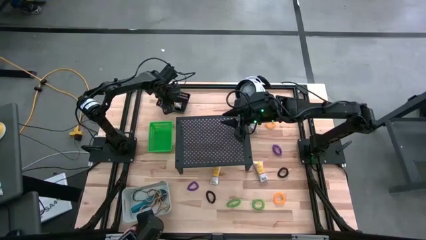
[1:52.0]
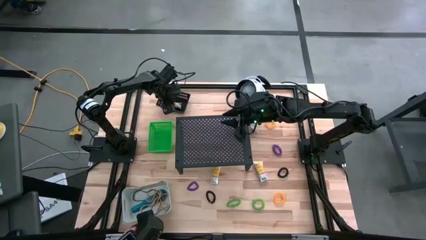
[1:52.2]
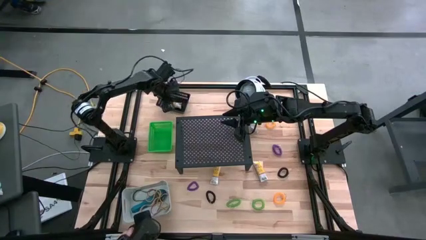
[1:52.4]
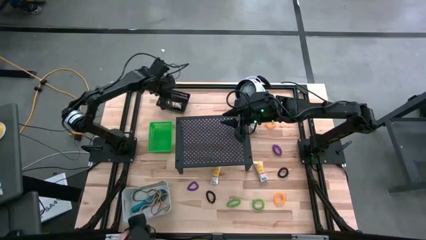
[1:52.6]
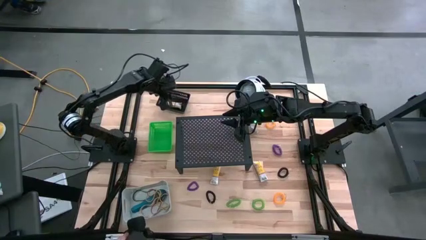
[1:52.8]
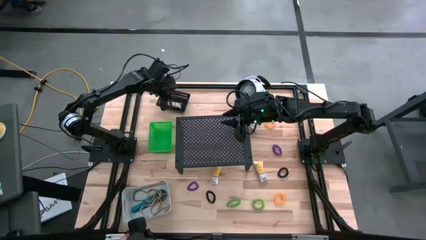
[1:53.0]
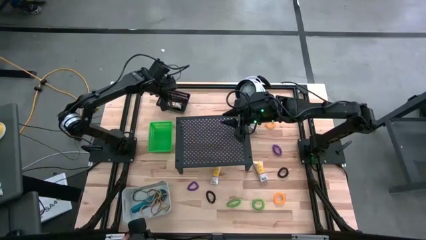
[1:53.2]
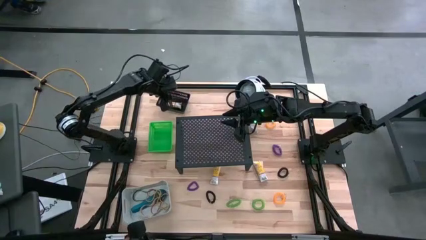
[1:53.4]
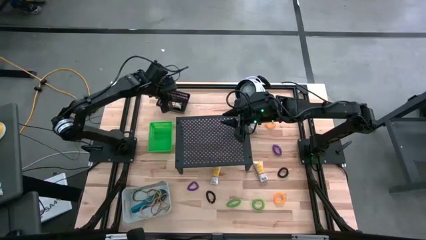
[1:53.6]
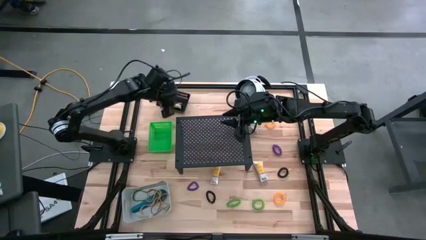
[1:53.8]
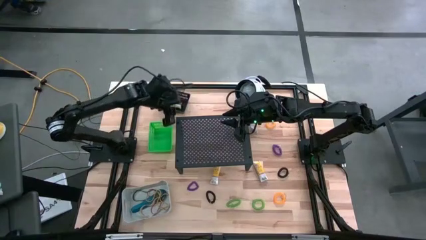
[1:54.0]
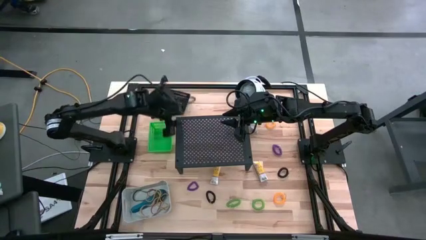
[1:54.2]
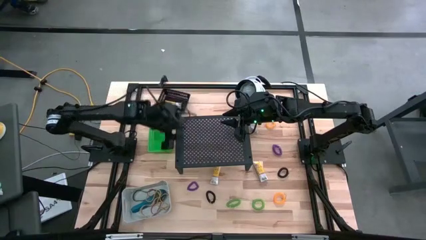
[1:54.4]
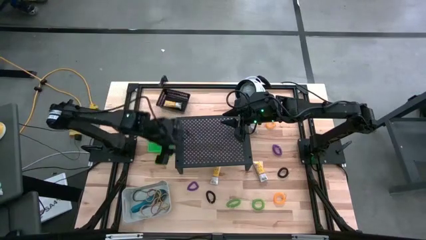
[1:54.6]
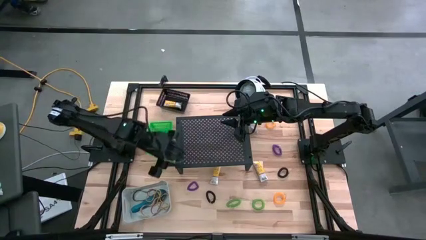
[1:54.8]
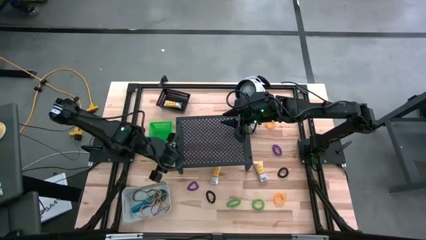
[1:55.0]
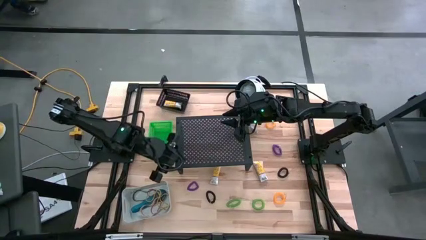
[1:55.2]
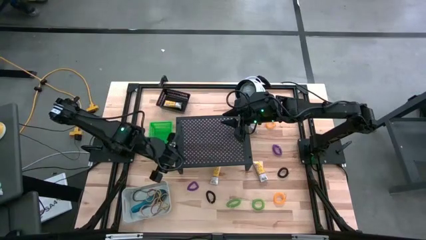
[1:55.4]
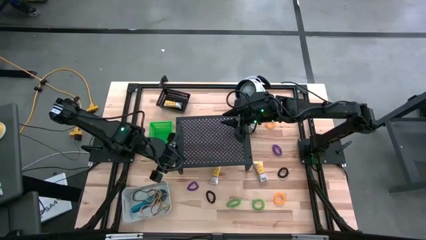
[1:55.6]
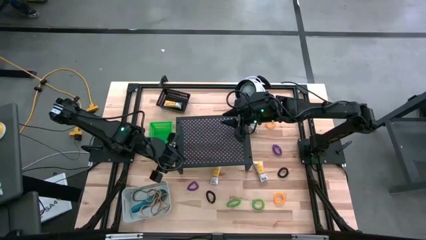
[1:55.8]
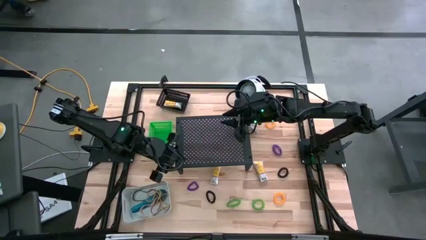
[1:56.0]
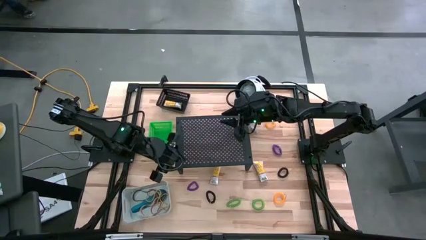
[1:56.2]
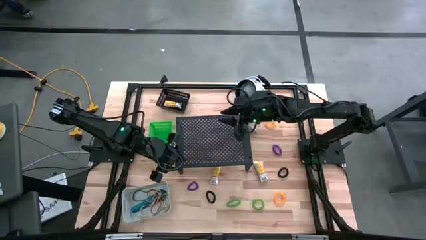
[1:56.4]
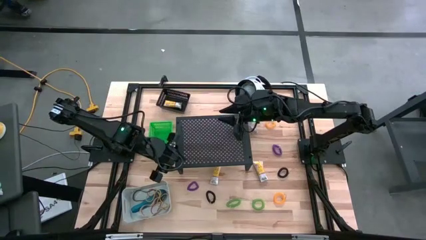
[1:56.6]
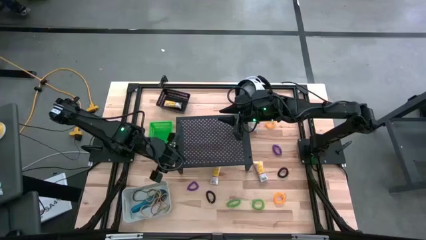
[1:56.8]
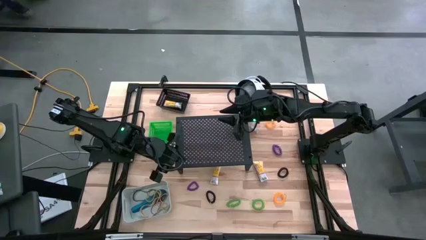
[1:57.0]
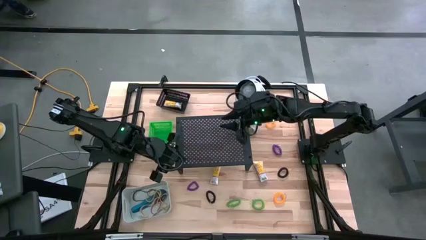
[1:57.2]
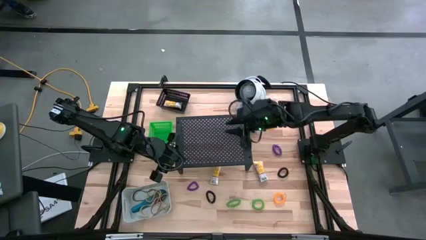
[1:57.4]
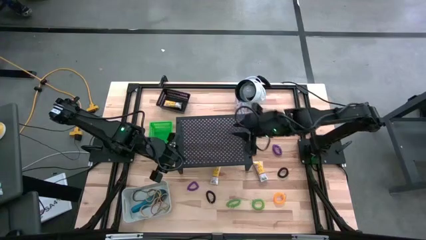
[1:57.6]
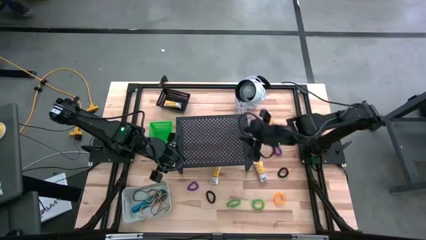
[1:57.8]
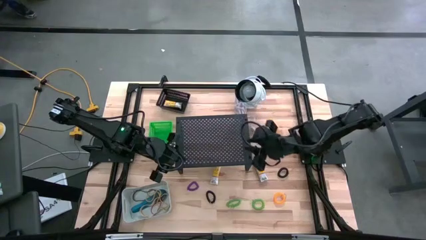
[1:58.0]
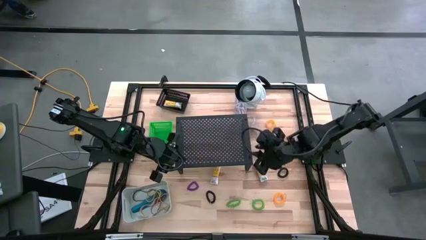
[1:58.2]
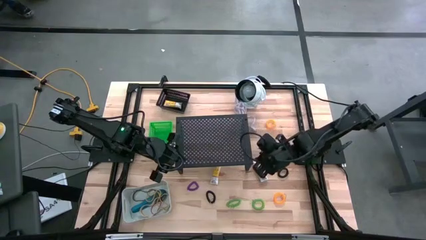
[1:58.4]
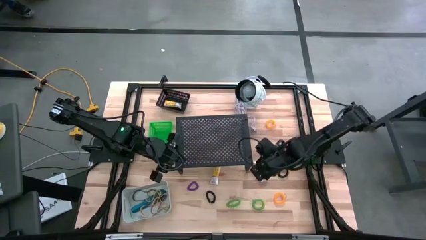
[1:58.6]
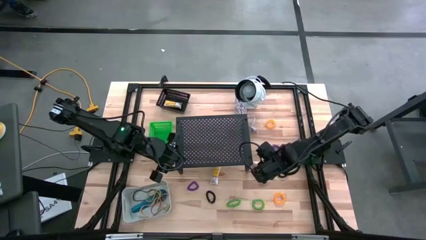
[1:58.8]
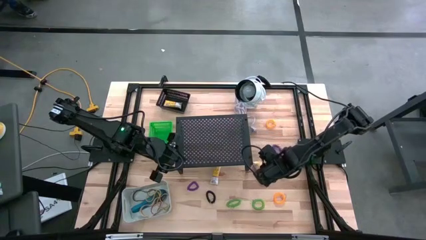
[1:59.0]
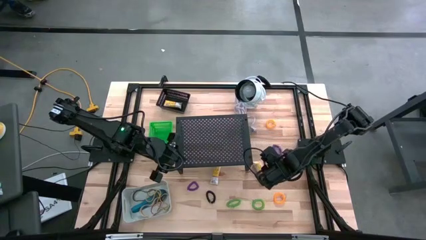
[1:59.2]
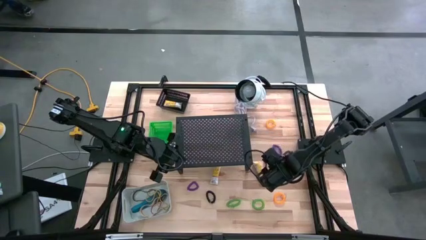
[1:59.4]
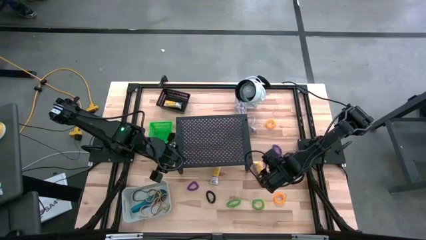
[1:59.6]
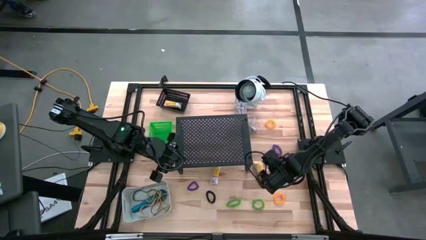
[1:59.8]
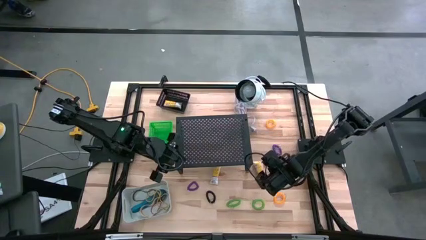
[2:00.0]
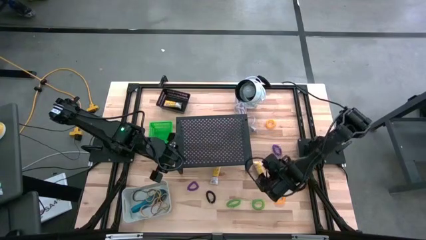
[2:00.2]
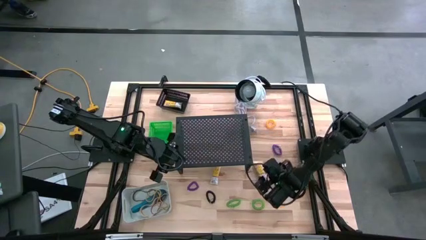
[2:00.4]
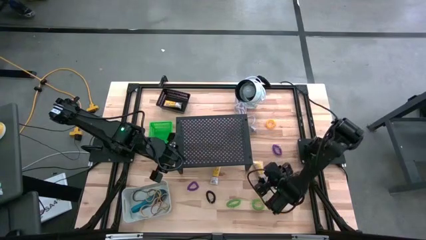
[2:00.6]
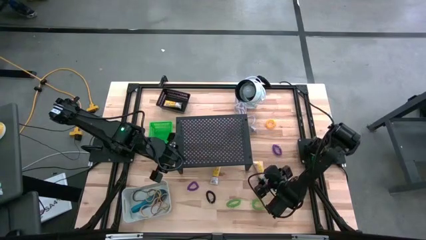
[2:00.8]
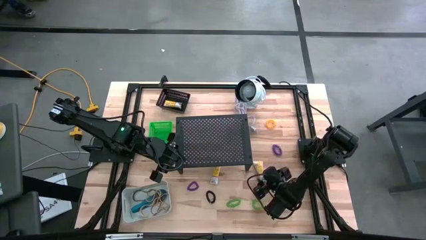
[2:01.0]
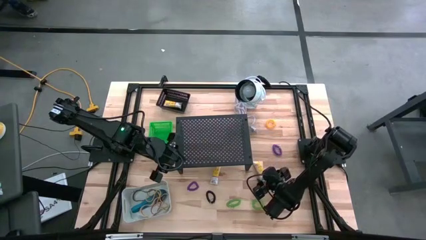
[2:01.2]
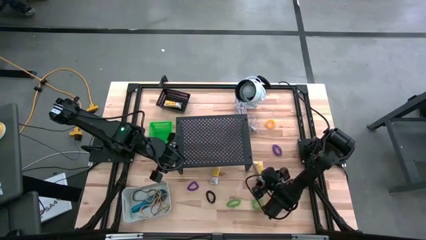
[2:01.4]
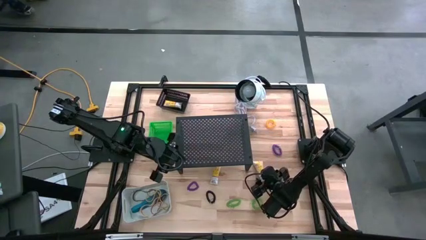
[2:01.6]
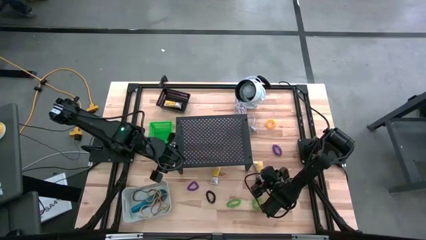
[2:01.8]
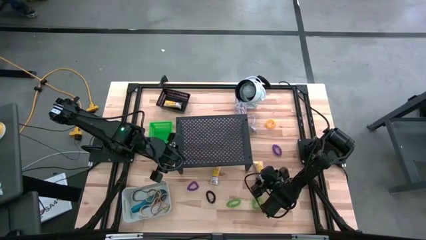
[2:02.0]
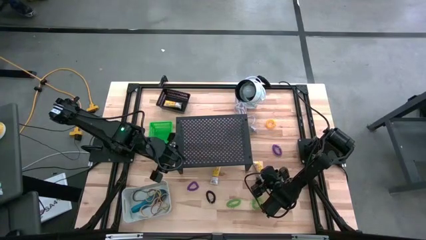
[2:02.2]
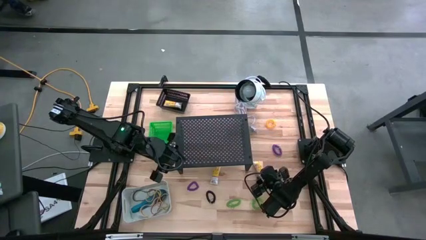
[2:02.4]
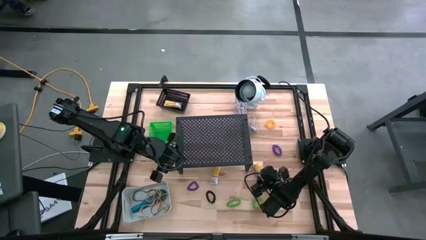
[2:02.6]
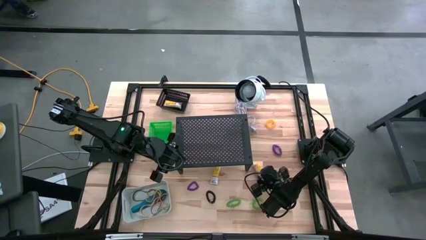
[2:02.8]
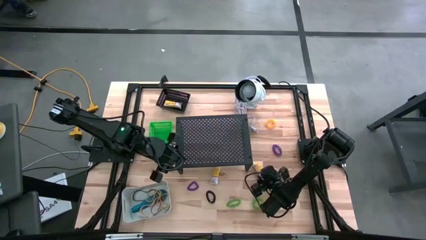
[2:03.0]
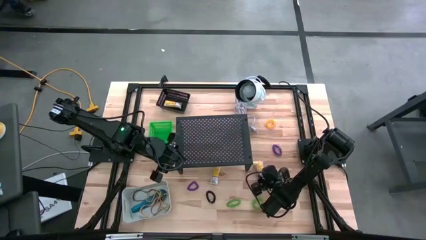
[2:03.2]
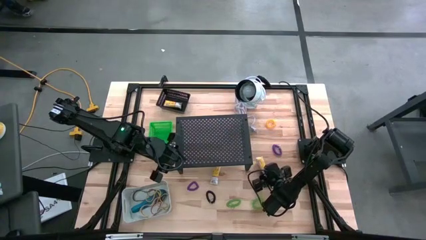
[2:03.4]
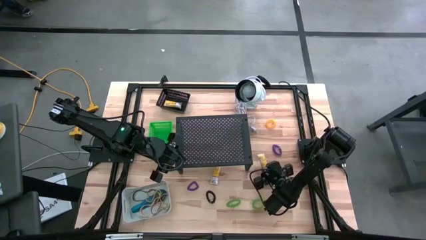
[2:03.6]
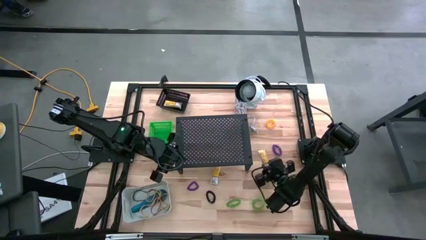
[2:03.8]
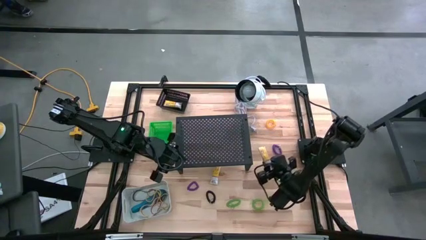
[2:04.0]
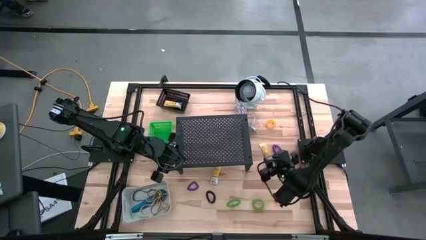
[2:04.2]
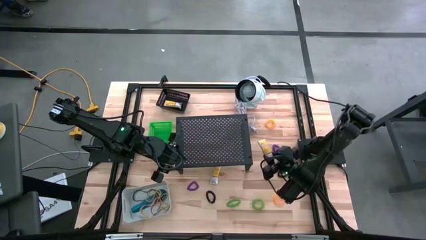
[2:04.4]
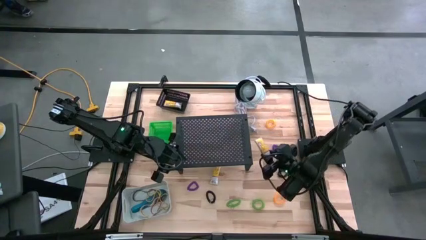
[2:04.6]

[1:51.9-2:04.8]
Task: Pick & Place Office Desk Supplies
Put the right crayon box into the black bin

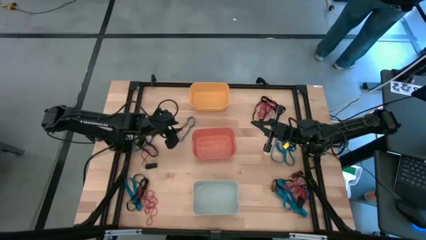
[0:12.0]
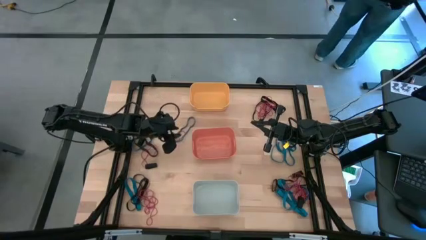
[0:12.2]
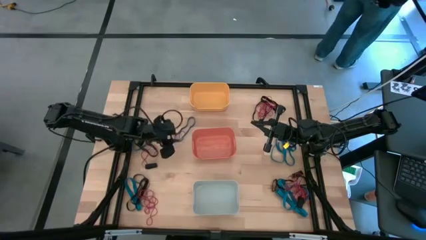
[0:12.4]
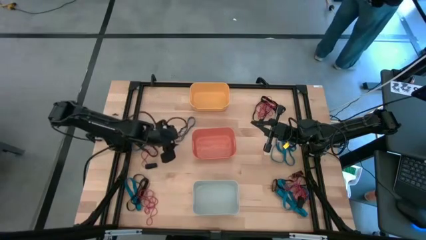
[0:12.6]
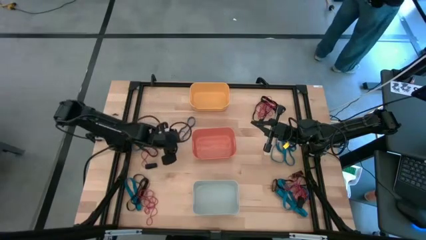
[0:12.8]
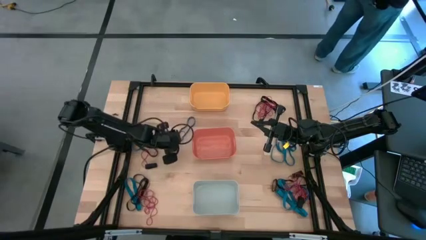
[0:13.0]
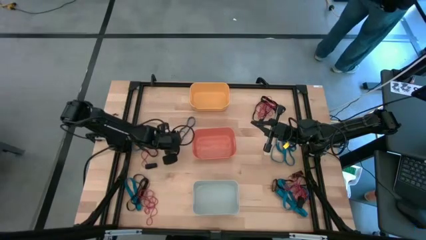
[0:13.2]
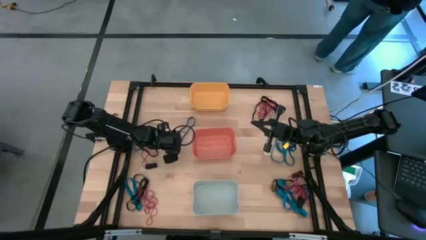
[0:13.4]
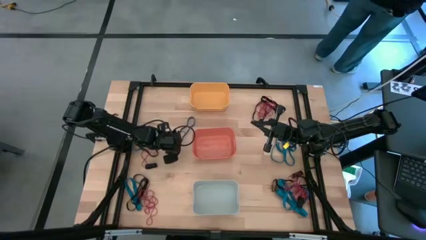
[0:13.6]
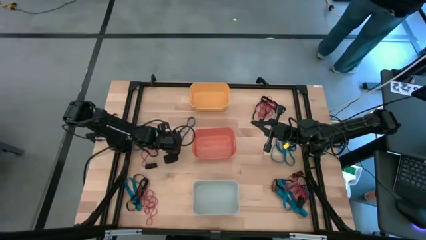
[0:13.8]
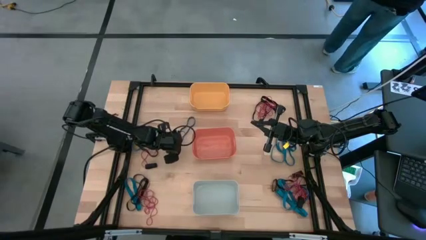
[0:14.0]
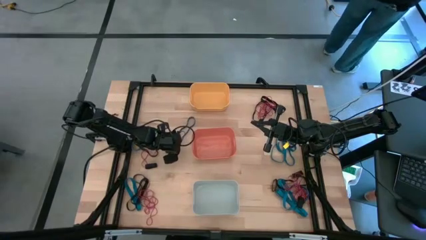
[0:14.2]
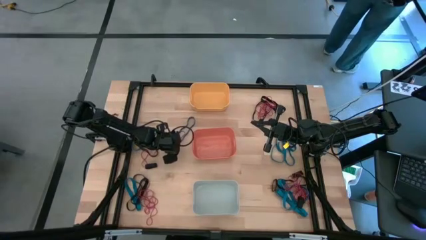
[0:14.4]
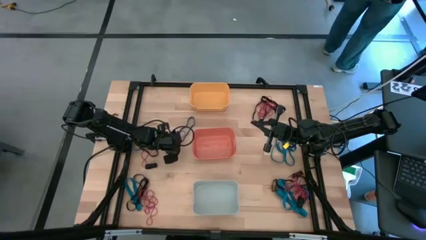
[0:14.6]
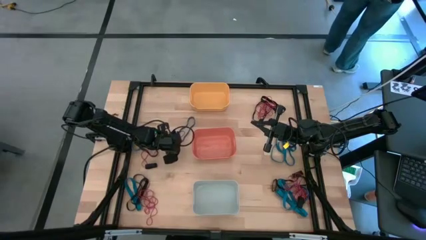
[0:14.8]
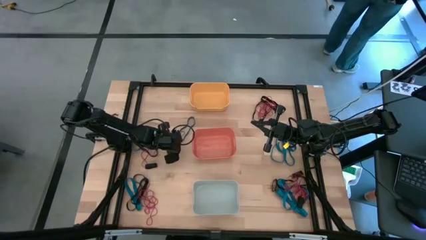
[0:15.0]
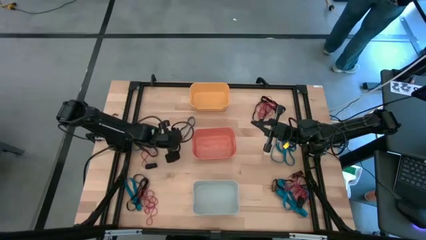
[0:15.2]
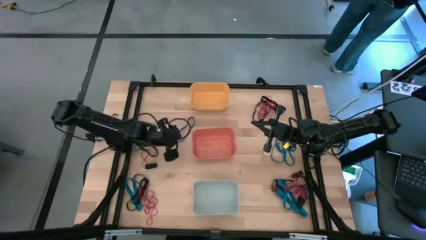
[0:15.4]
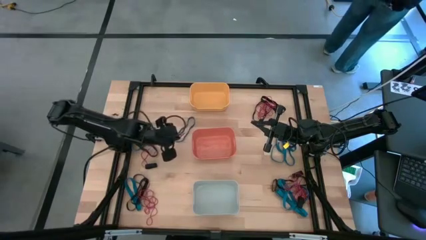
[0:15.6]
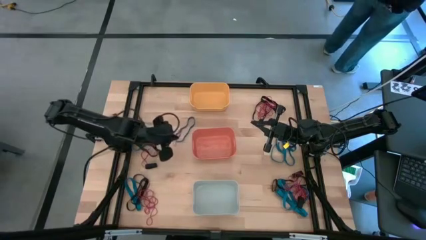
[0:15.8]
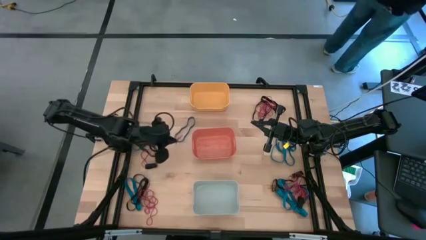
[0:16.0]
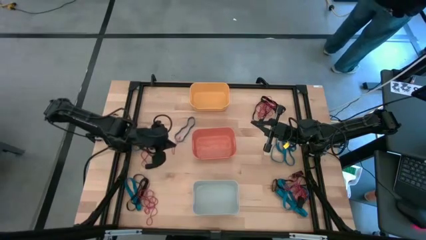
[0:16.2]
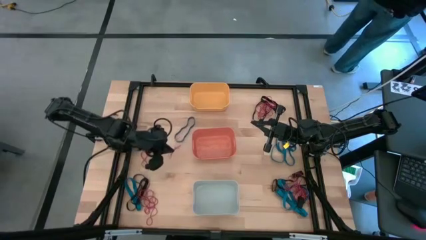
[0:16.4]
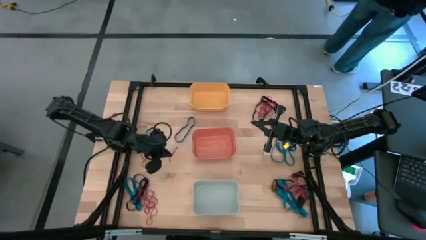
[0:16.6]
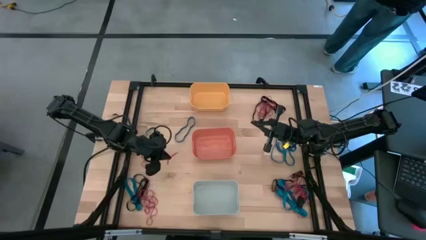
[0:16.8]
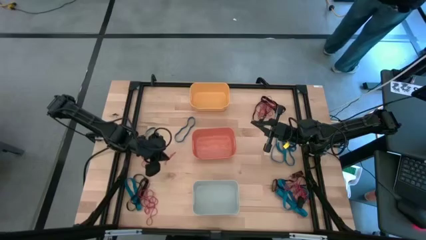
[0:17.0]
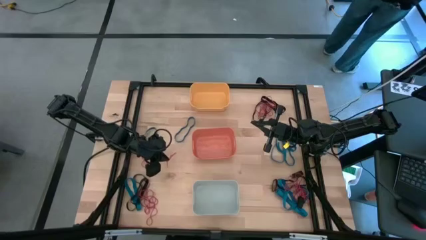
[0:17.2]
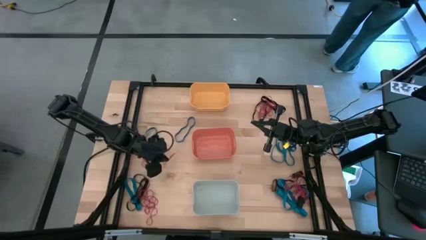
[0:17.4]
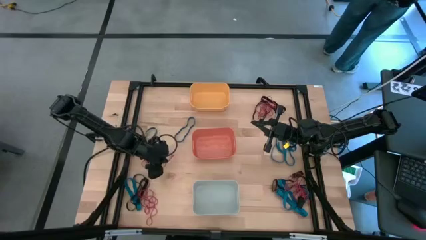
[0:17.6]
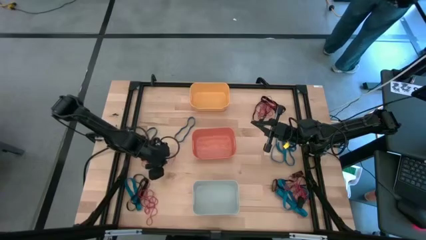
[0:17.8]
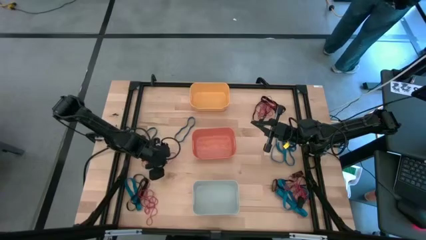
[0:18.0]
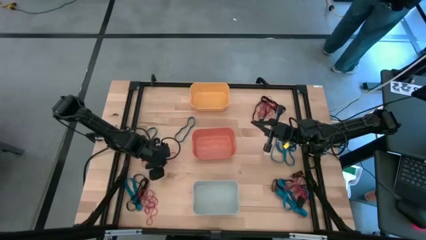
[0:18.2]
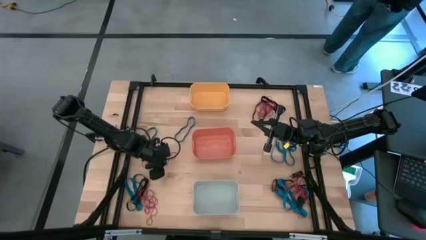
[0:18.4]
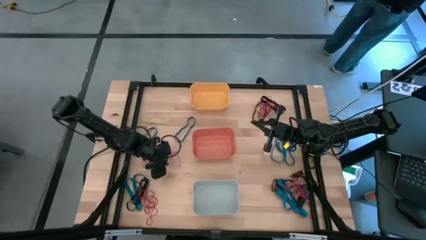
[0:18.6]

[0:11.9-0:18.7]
Task: Sort rubber bands into baskets
Move the red rubber band to the middle left of the table
